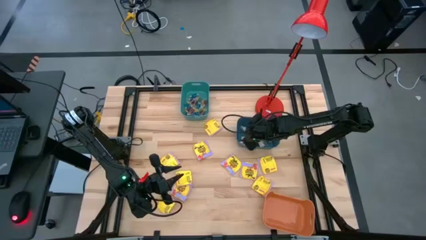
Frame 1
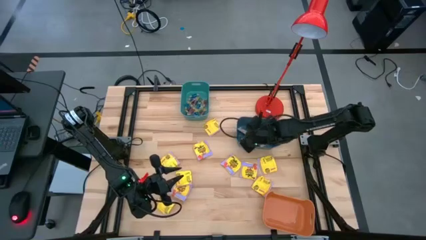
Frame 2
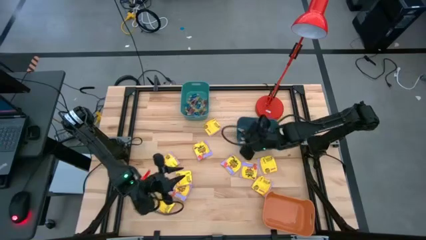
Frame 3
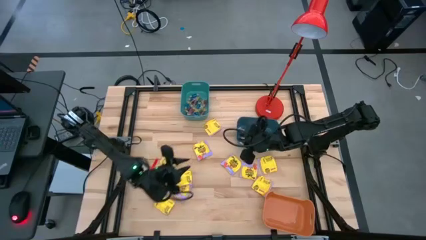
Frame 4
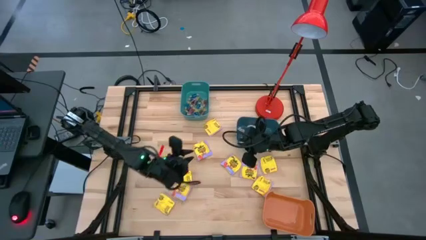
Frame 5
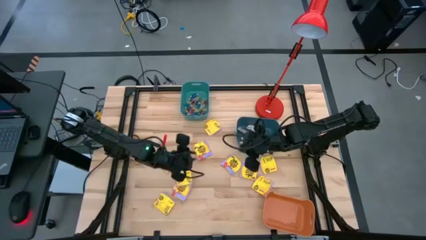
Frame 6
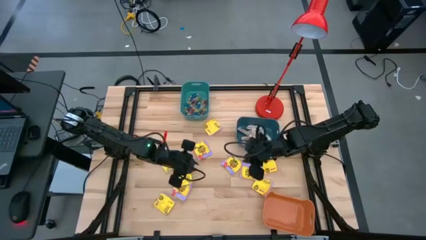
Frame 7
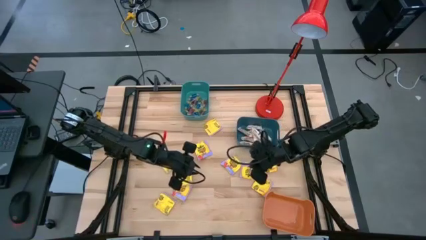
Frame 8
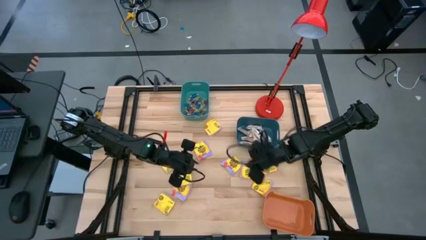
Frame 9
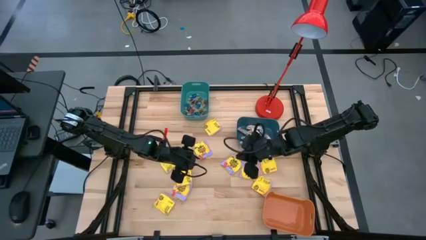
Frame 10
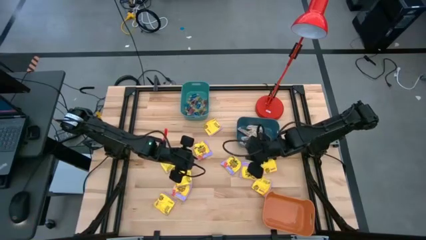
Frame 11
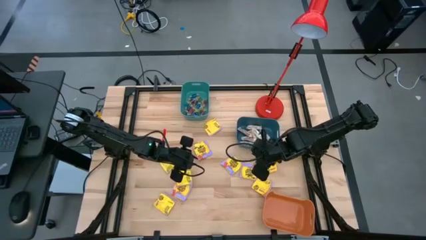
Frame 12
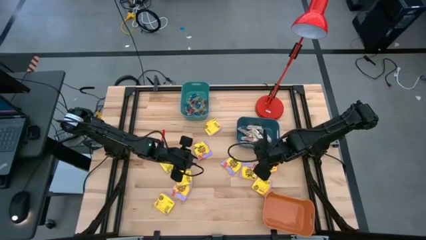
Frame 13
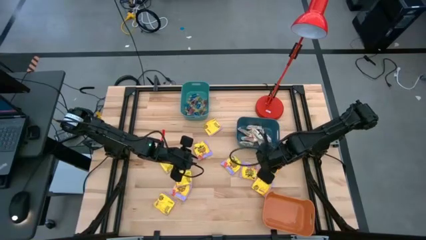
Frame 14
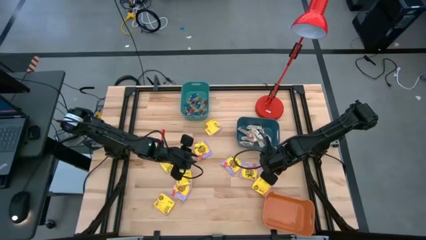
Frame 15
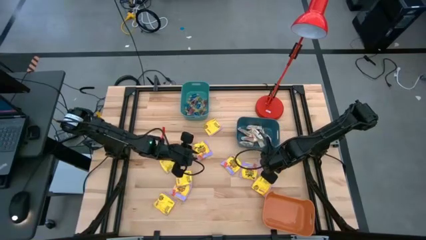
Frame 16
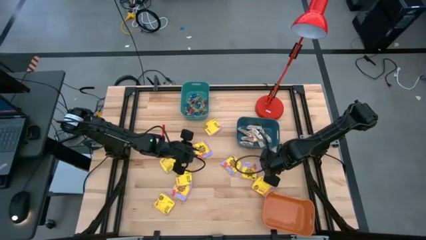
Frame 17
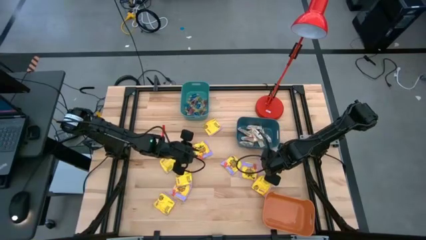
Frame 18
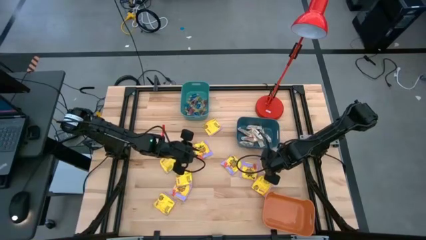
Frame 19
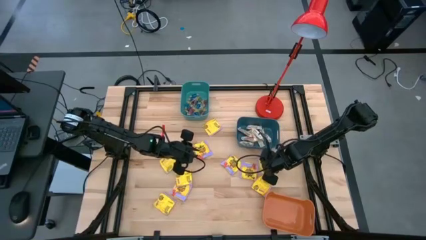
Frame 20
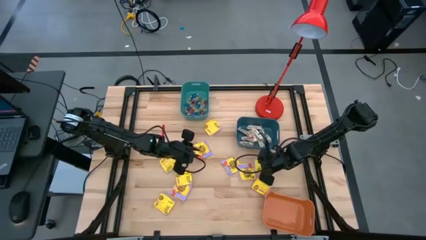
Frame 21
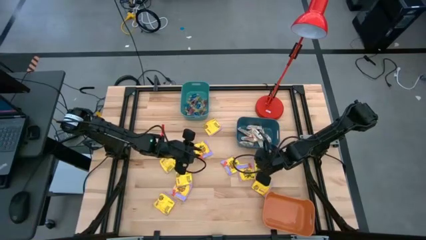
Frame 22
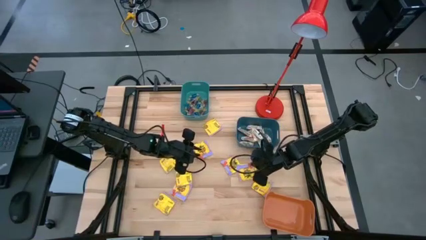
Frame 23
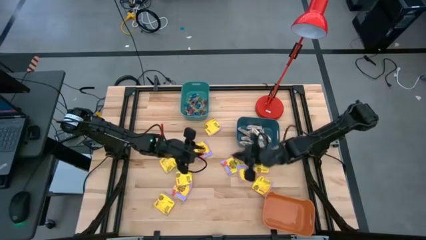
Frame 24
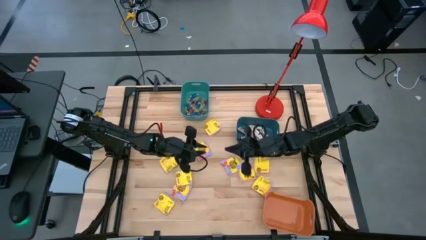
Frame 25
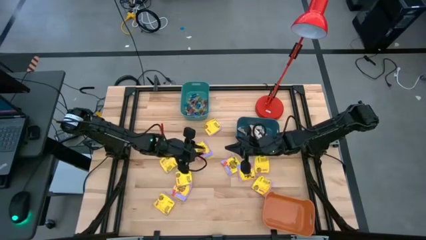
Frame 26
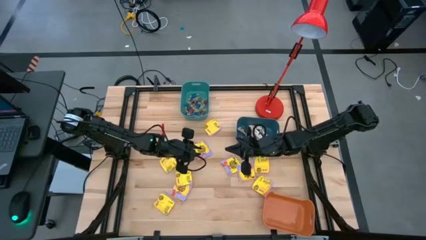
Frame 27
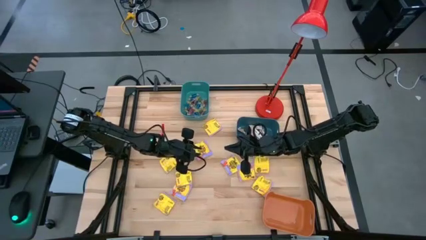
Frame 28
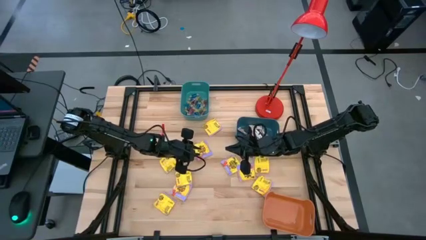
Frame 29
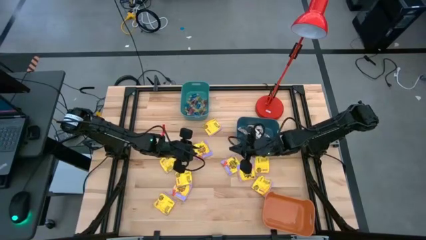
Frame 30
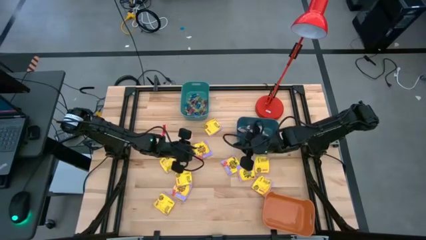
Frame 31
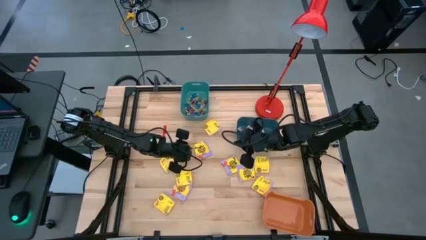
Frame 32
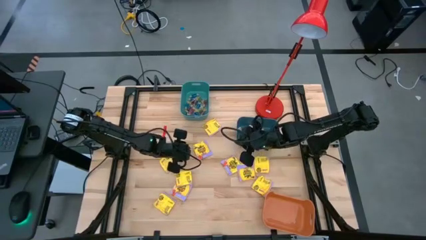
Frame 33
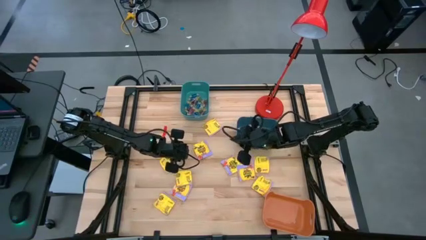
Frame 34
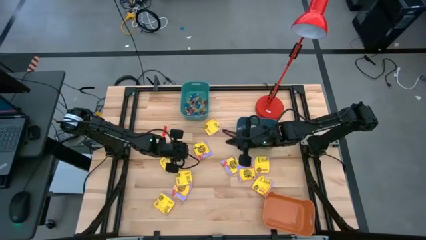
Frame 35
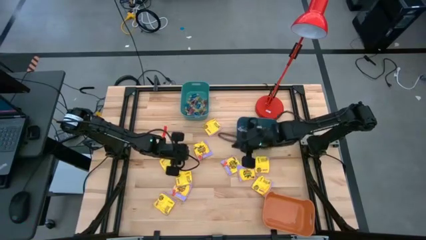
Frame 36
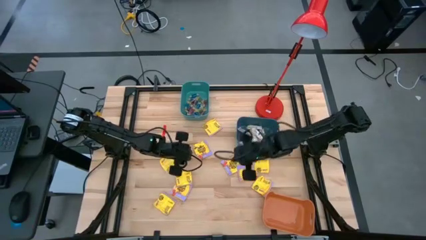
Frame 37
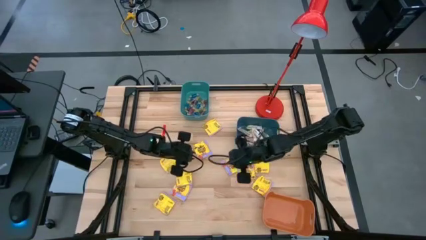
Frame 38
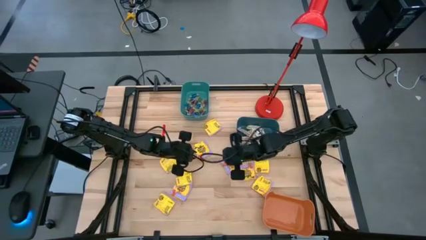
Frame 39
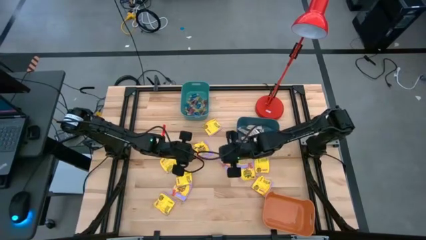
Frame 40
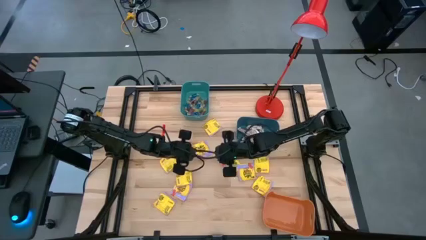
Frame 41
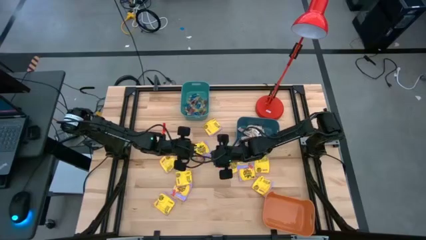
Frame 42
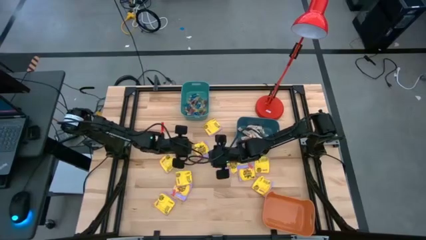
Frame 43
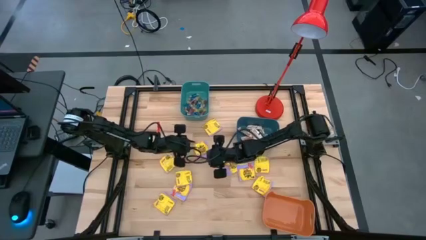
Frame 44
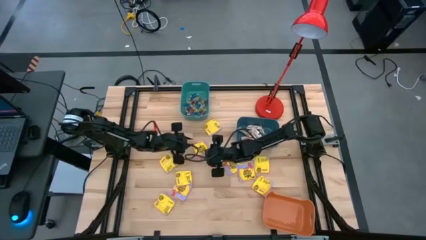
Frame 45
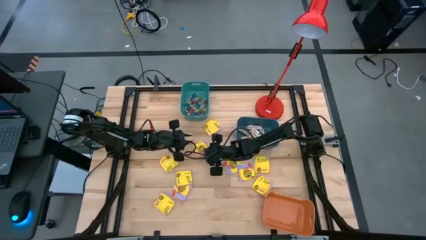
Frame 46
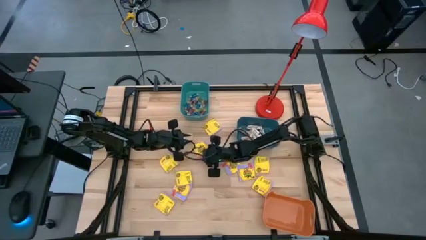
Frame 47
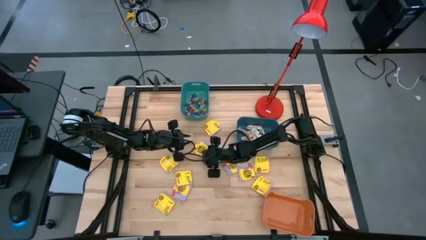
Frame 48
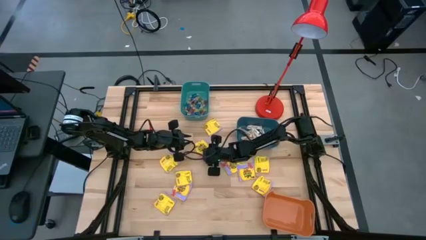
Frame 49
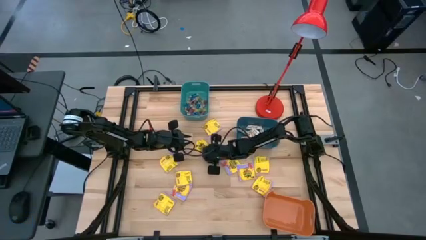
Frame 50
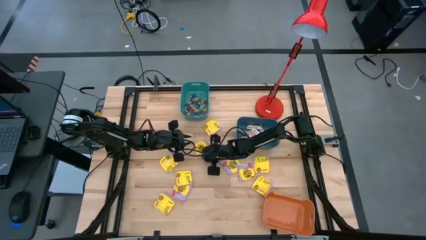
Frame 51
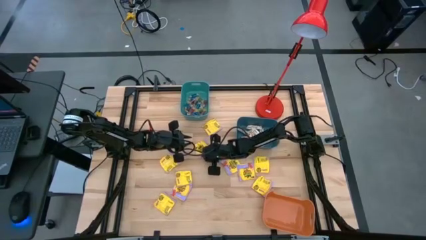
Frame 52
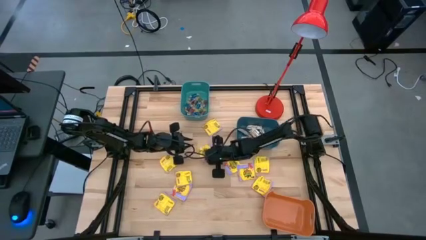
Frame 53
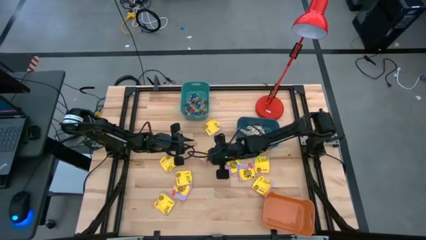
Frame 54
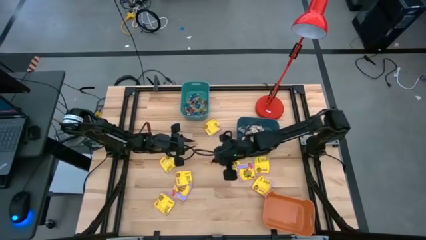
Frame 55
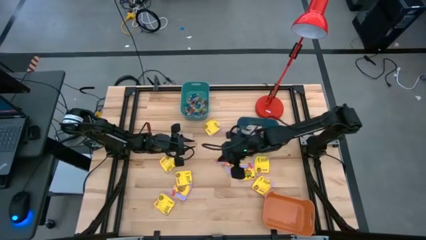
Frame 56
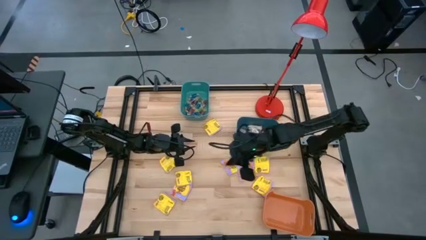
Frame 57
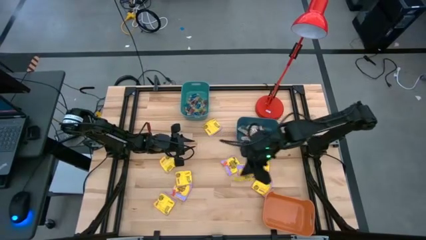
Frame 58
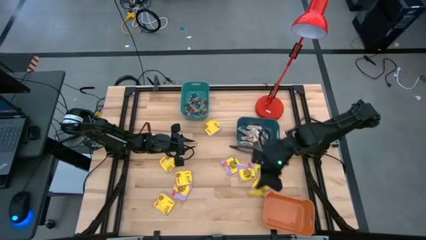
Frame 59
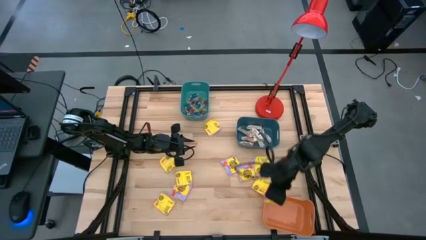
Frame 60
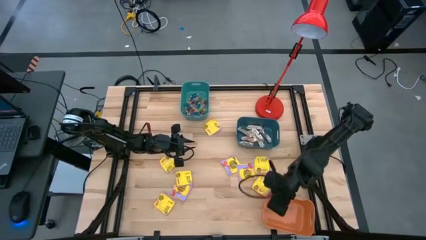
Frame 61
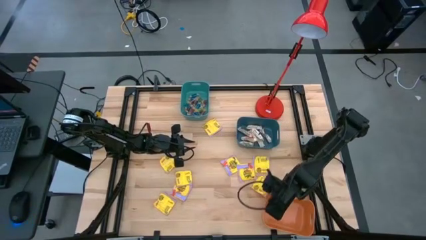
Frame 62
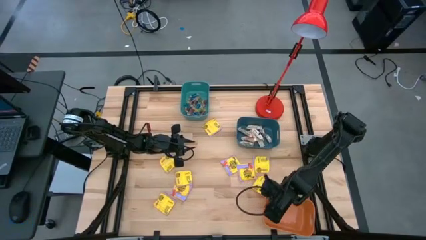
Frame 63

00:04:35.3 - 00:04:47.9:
Task: Sort candy
Put the yellow candy bag into the orange bin

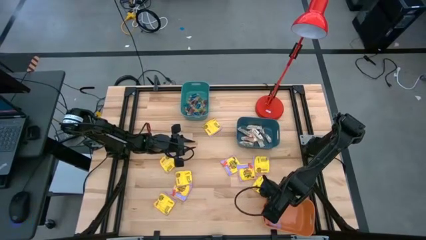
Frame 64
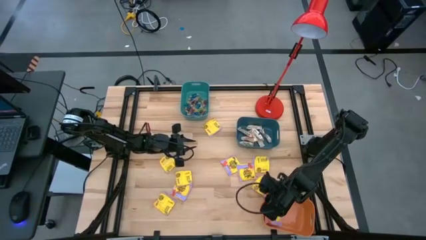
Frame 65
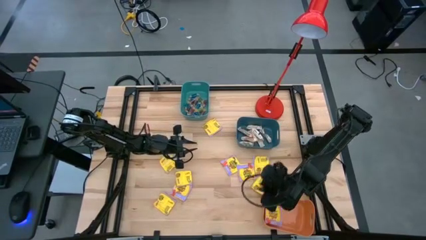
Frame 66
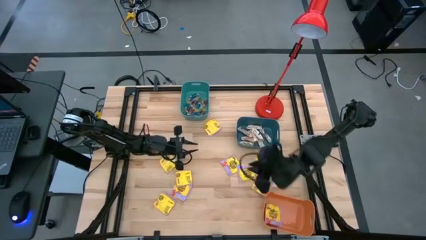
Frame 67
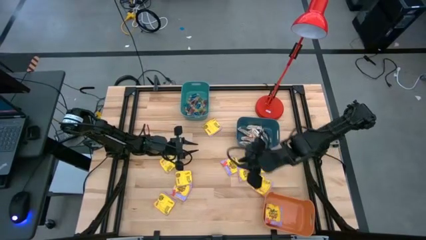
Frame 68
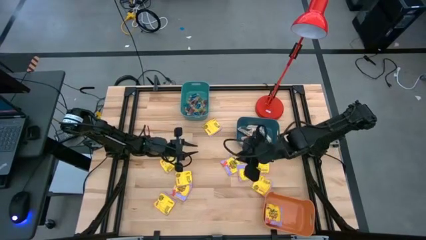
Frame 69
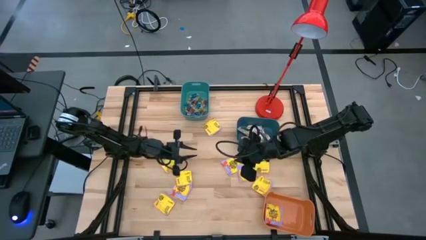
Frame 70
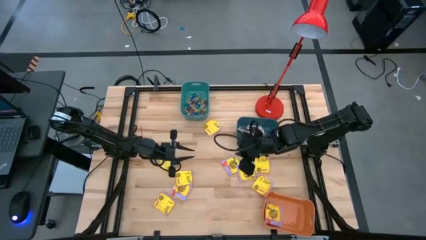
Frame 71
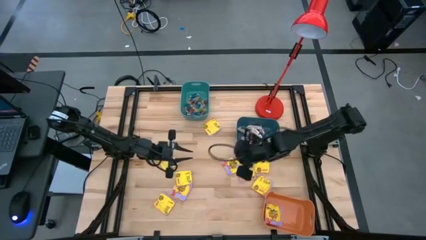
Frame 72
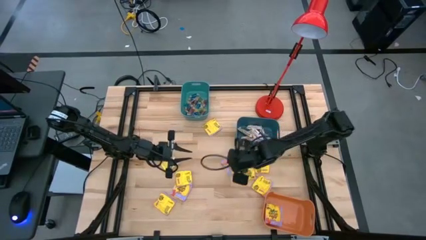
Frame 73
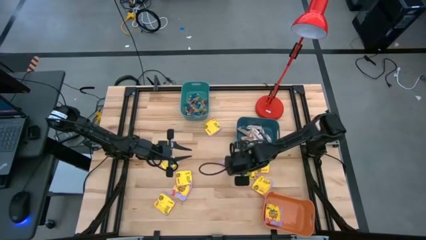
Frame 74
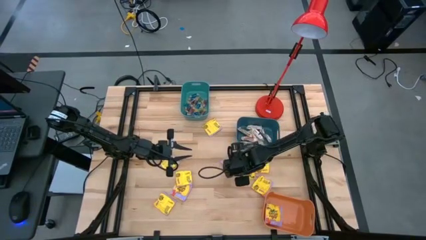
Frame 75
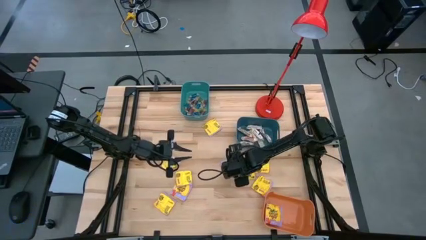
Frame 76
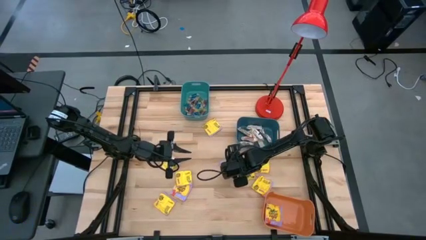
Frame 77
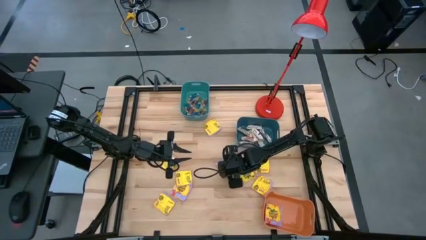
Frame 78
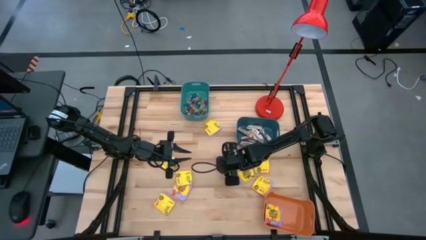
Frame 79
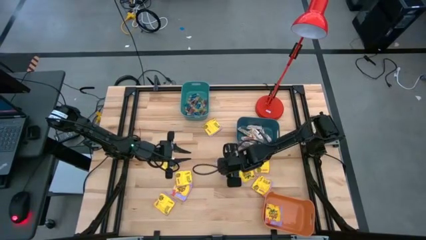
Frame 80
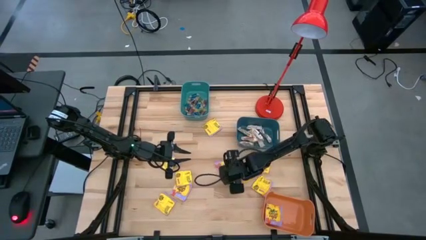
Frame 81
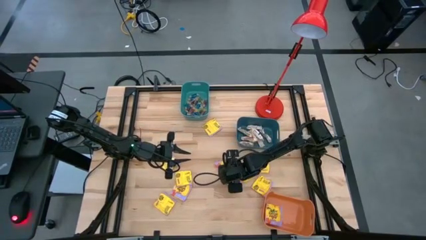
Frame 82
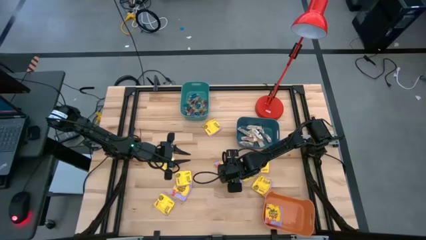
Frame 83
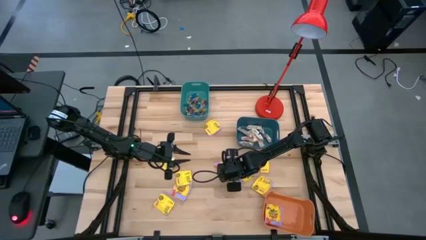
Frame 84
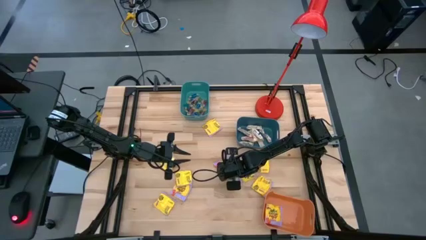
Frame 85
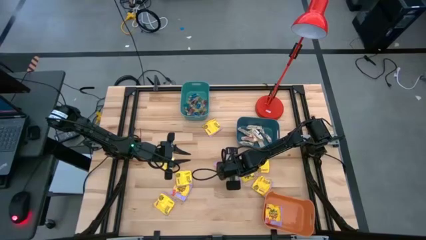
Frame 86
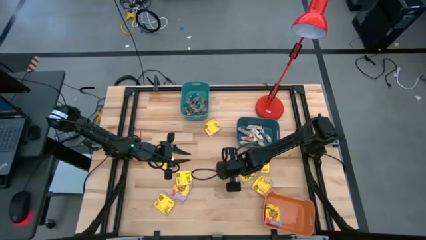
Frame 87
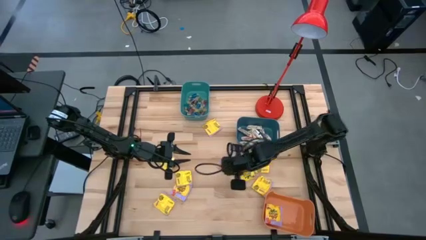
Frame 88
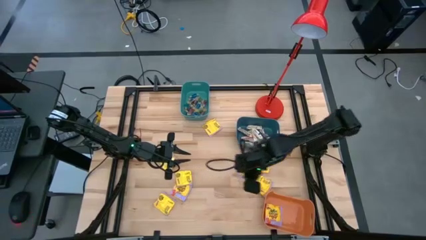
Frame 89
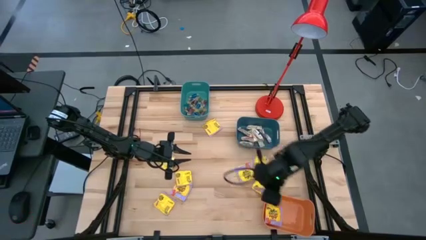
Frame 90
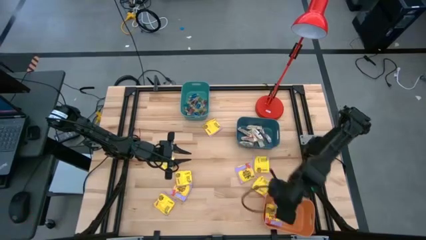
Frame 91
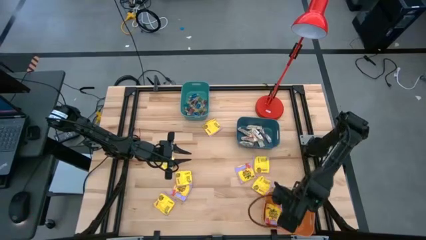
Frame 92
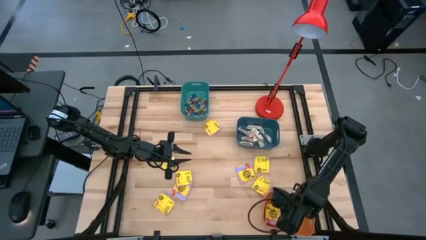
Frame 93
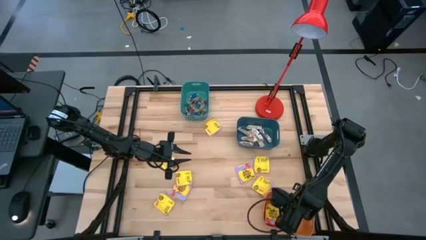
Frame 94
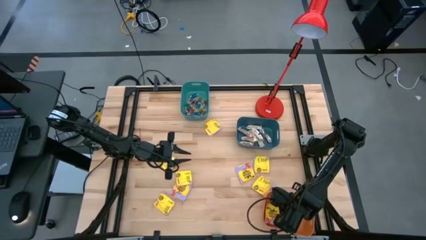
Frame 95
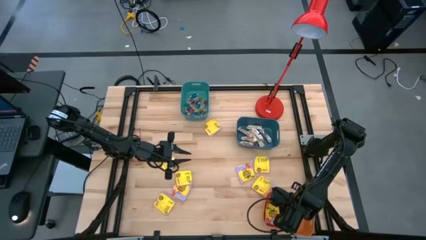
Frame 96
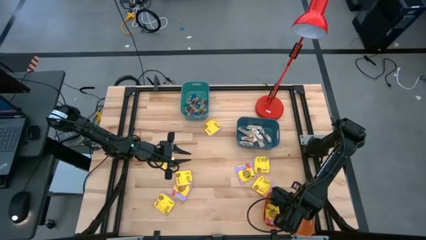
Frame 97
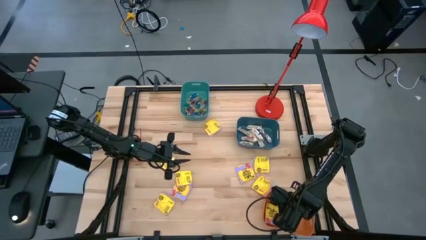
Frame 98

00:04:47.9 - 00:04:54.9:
Put the yellow candy bag into the orange bin
